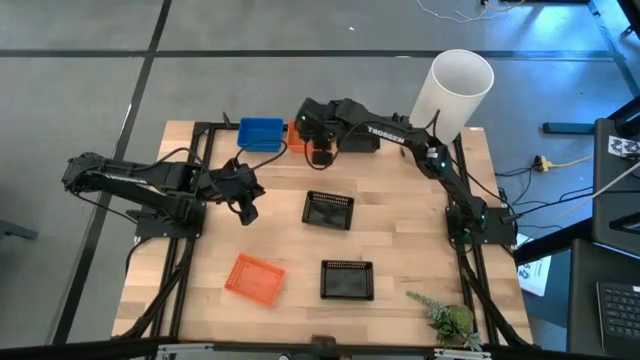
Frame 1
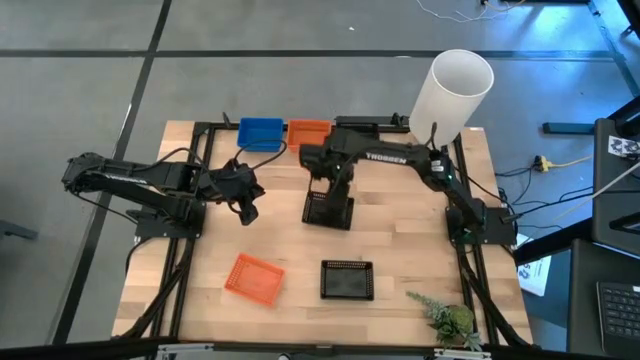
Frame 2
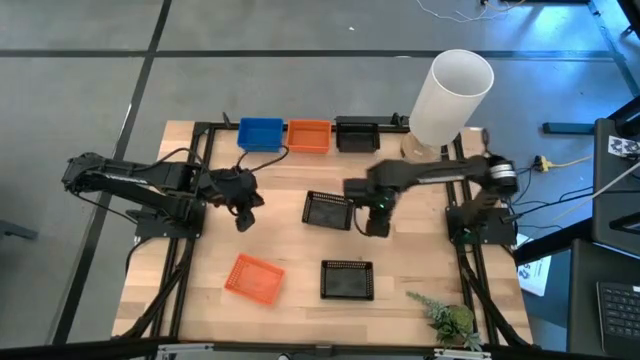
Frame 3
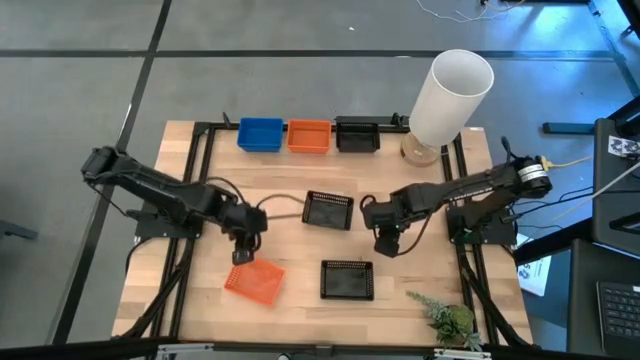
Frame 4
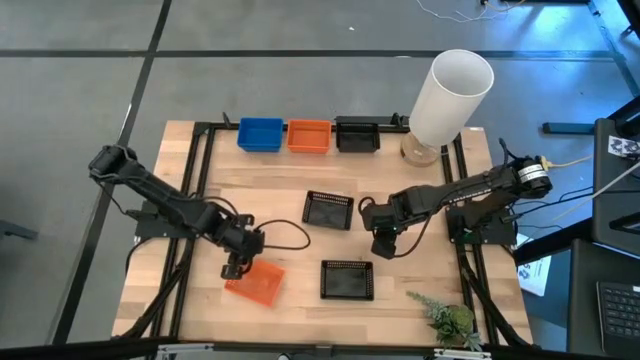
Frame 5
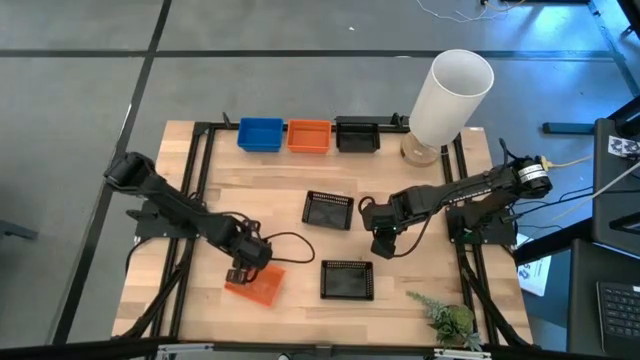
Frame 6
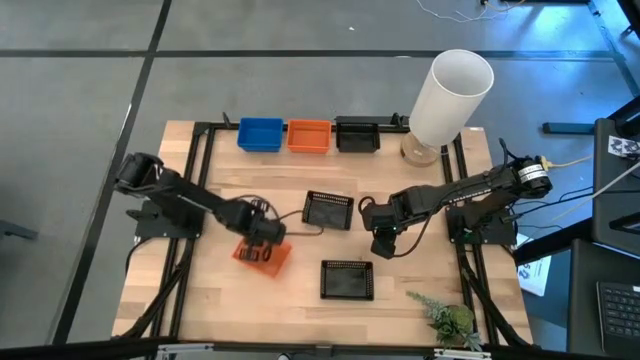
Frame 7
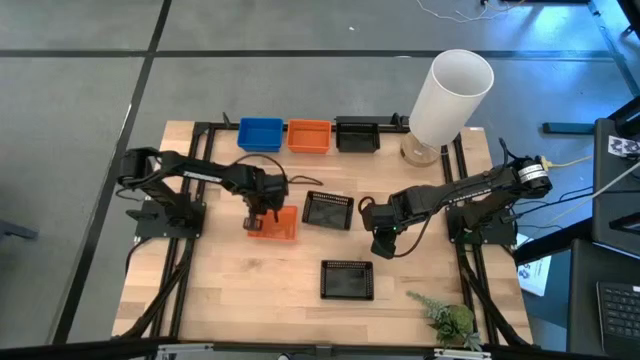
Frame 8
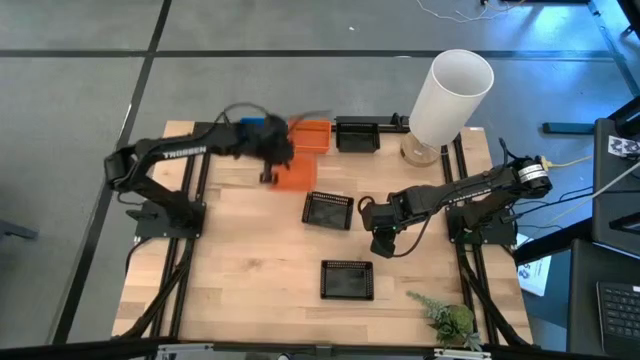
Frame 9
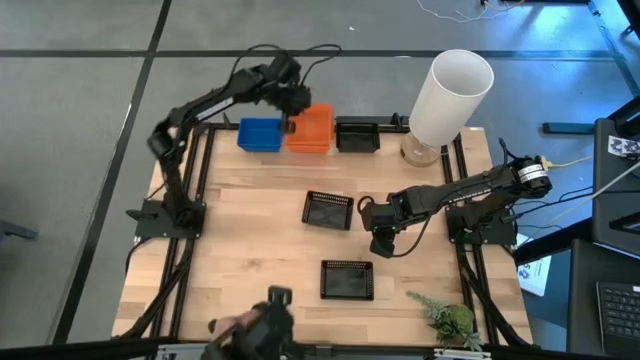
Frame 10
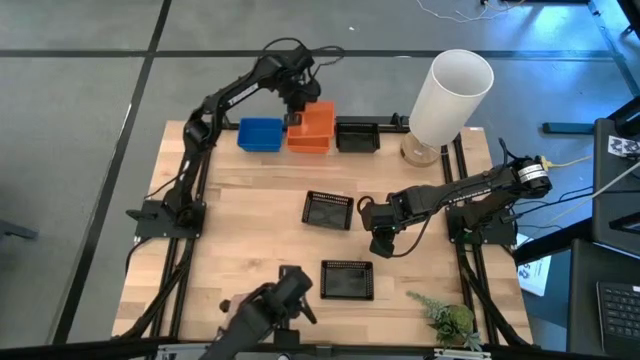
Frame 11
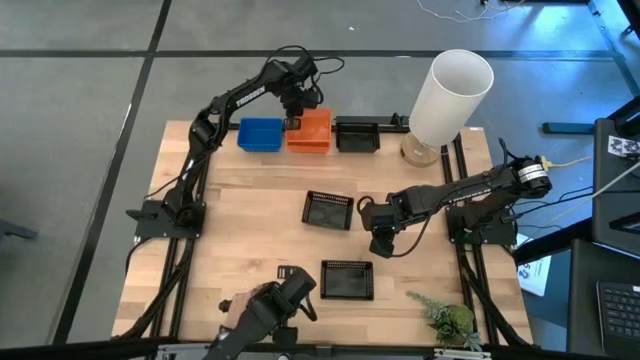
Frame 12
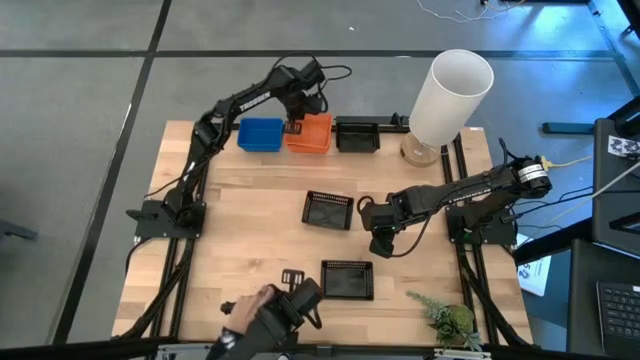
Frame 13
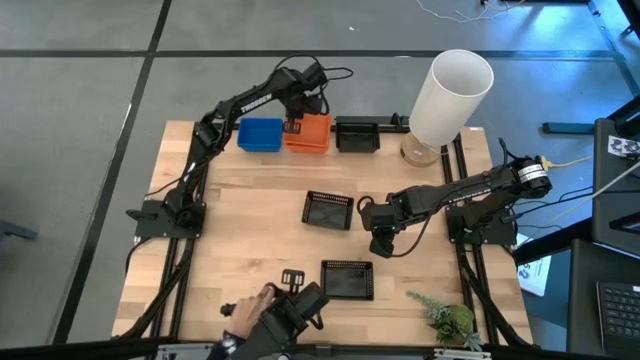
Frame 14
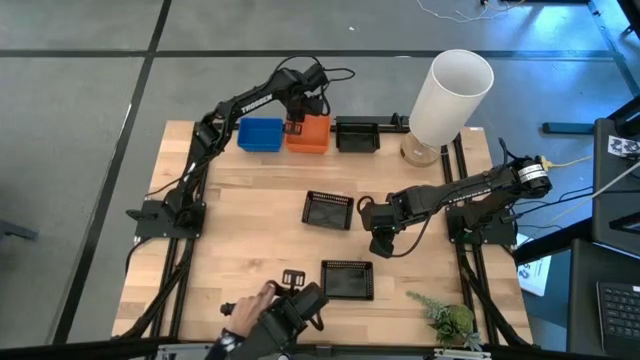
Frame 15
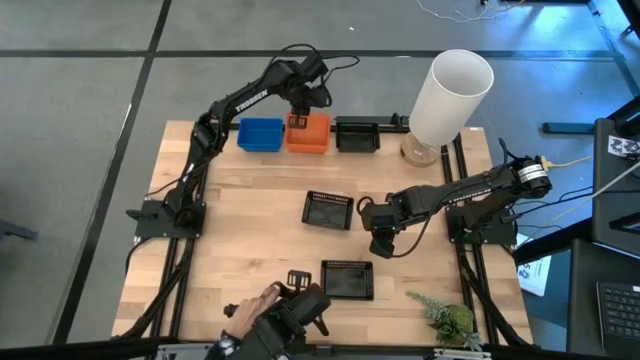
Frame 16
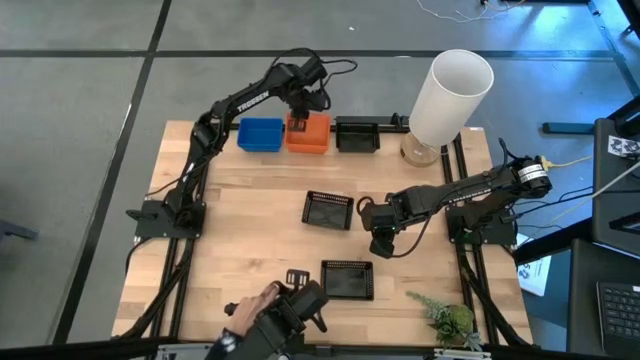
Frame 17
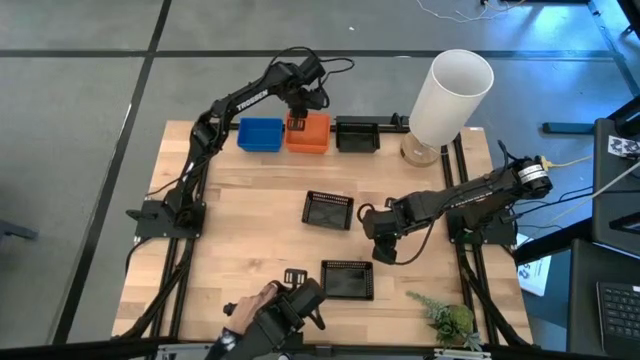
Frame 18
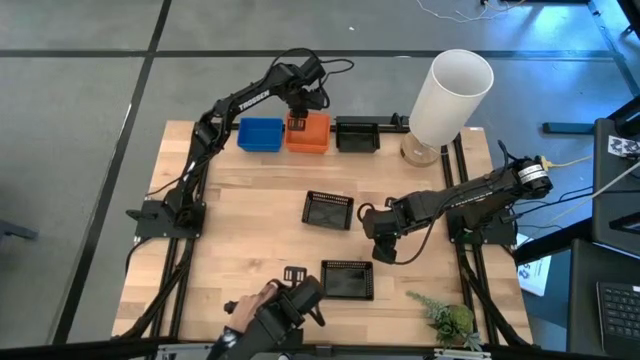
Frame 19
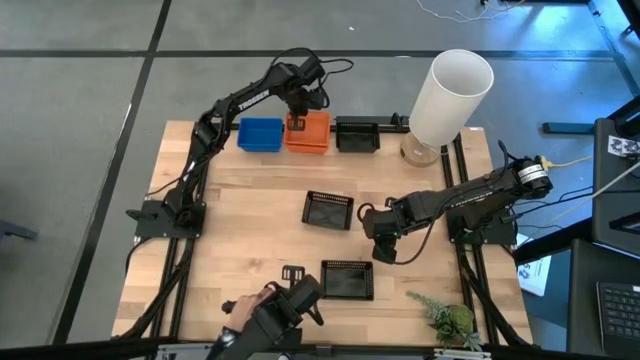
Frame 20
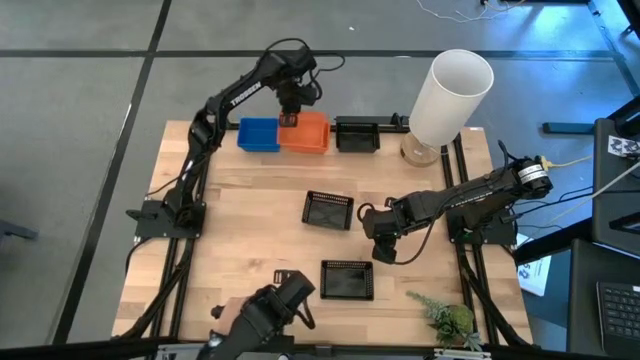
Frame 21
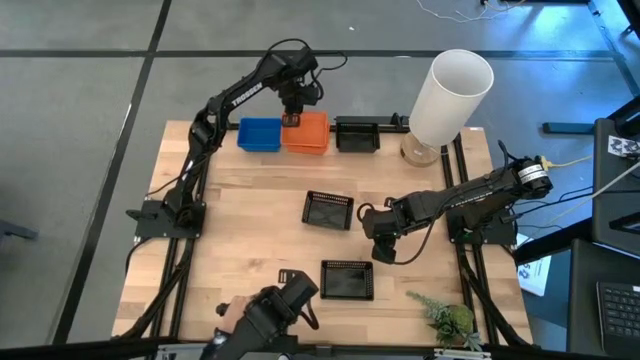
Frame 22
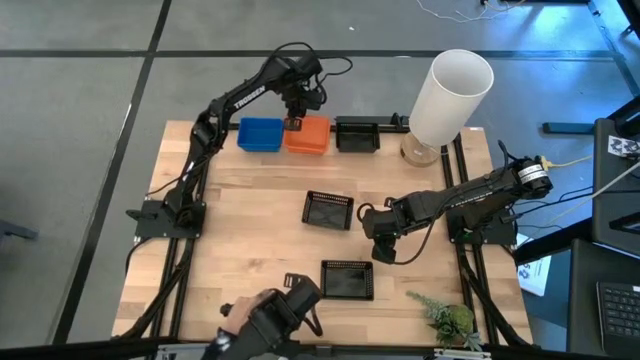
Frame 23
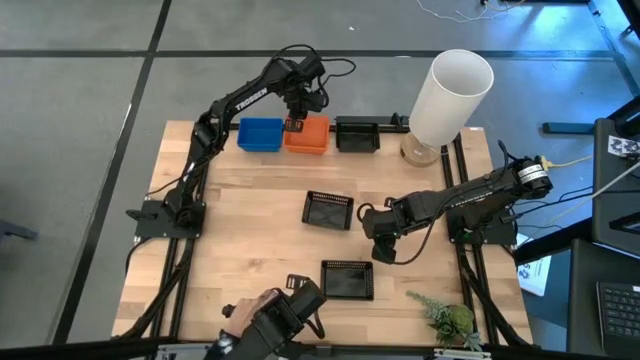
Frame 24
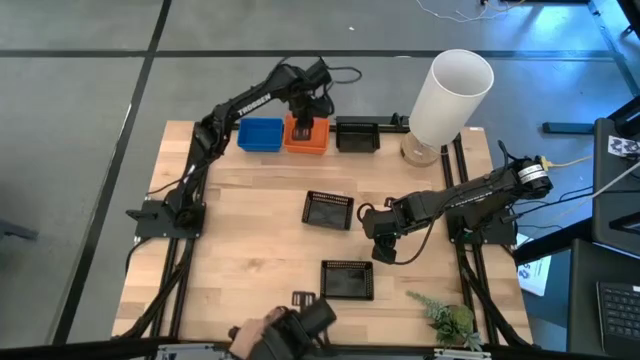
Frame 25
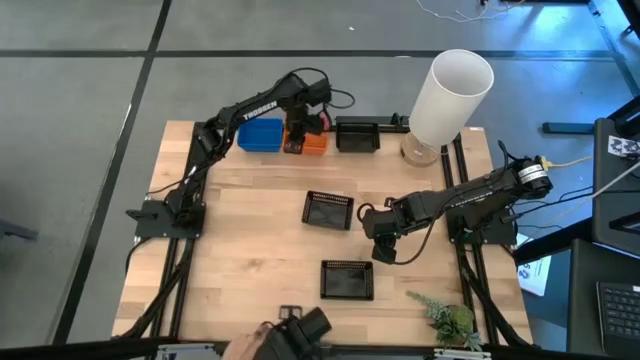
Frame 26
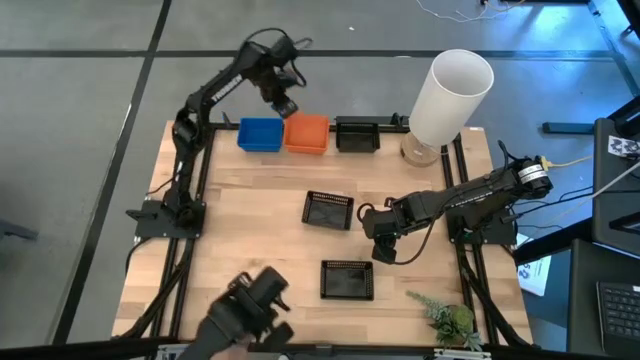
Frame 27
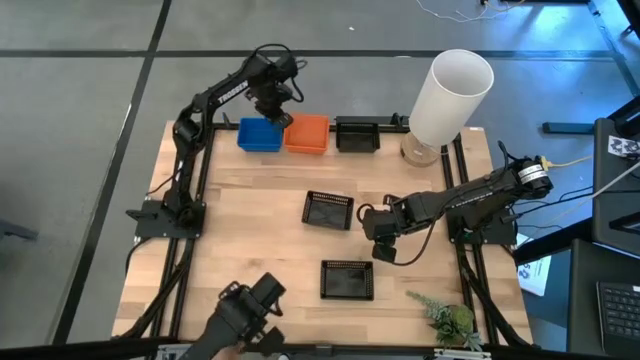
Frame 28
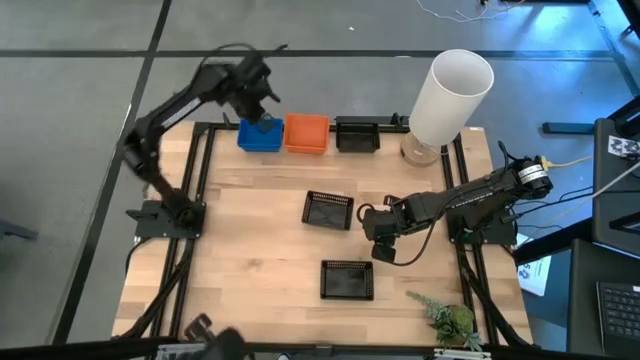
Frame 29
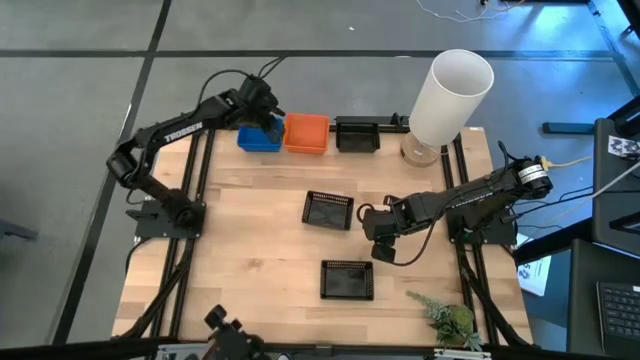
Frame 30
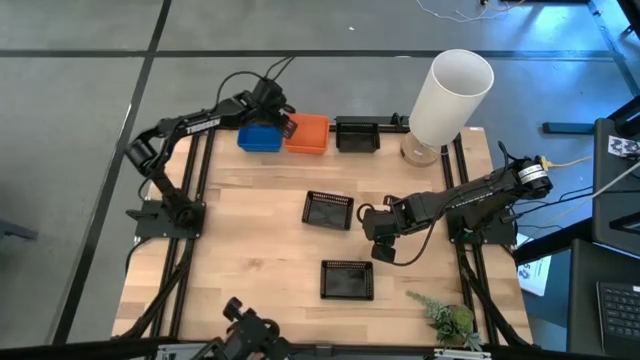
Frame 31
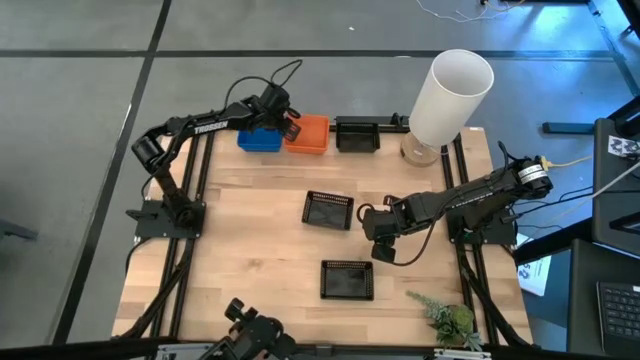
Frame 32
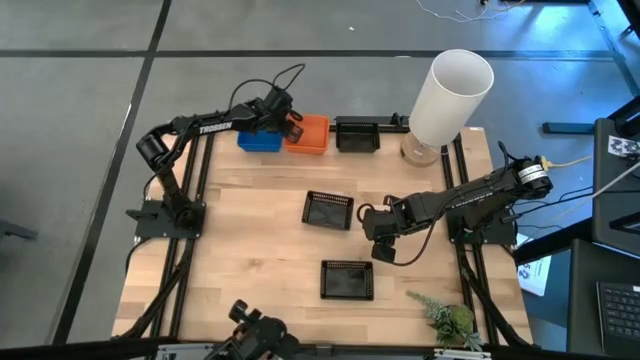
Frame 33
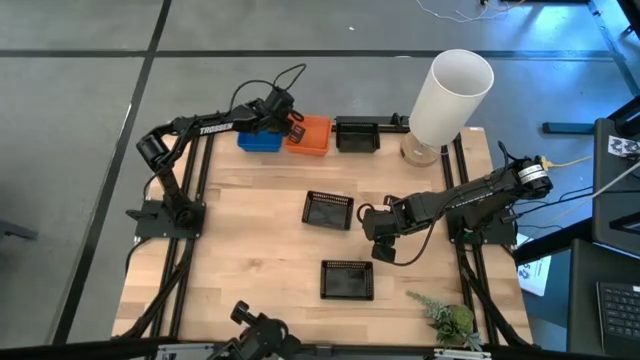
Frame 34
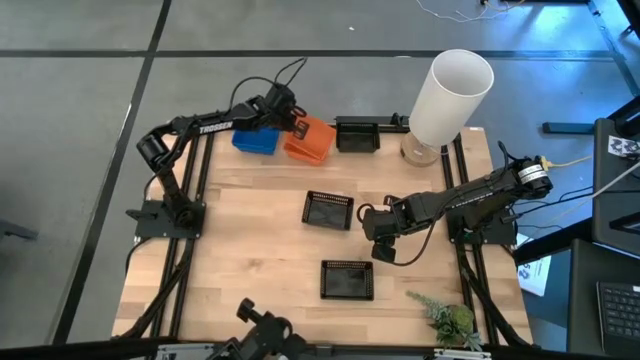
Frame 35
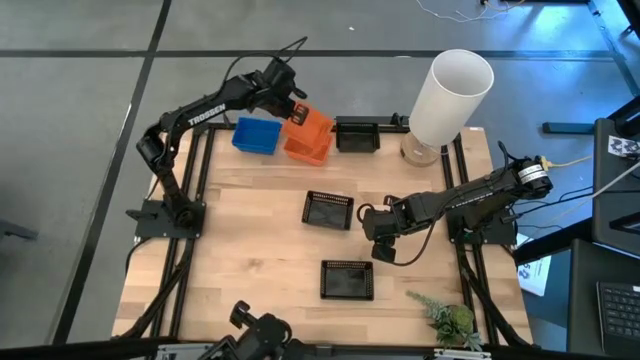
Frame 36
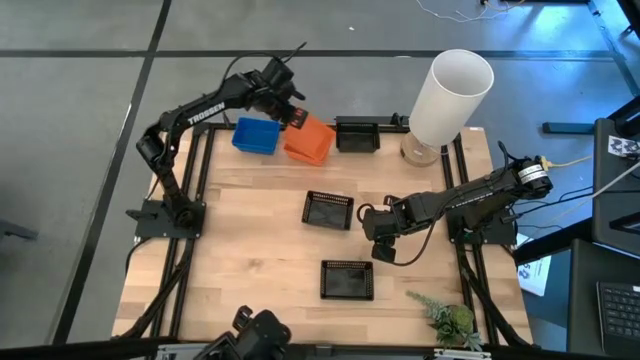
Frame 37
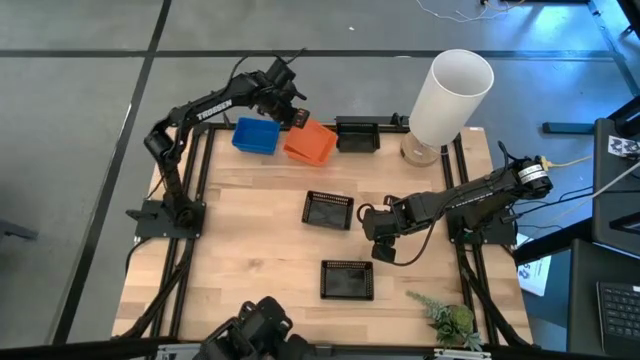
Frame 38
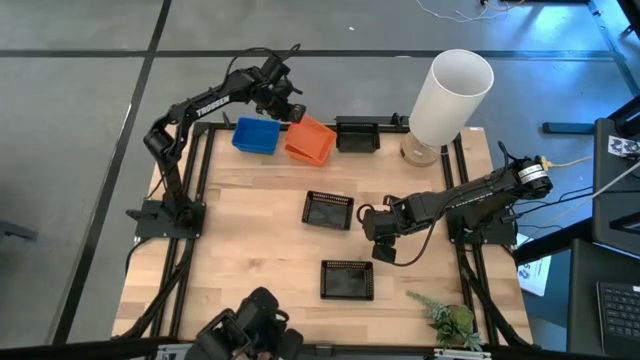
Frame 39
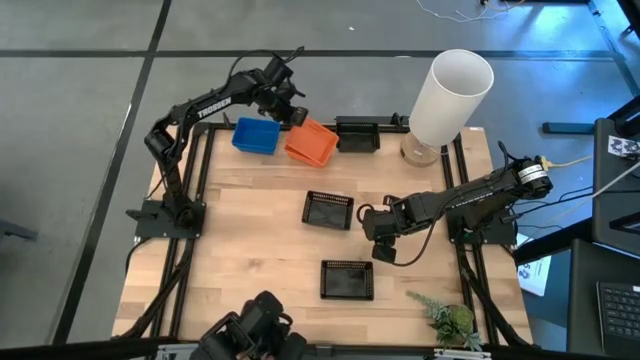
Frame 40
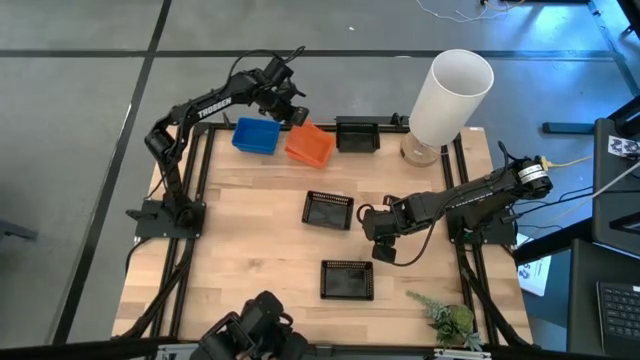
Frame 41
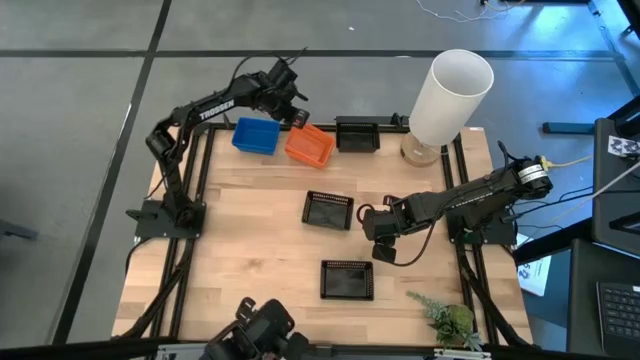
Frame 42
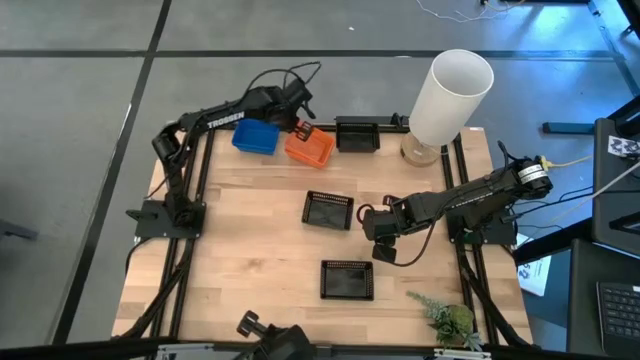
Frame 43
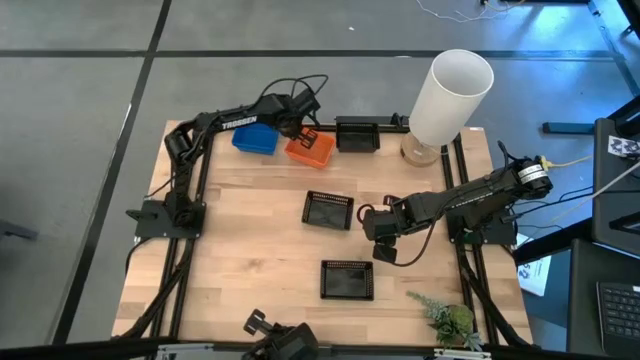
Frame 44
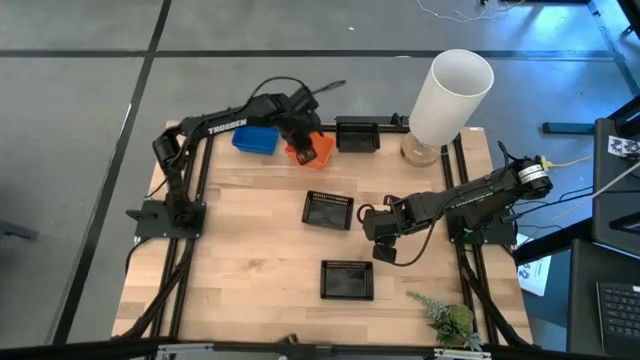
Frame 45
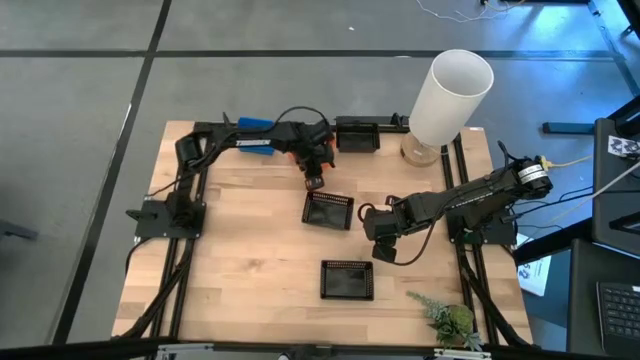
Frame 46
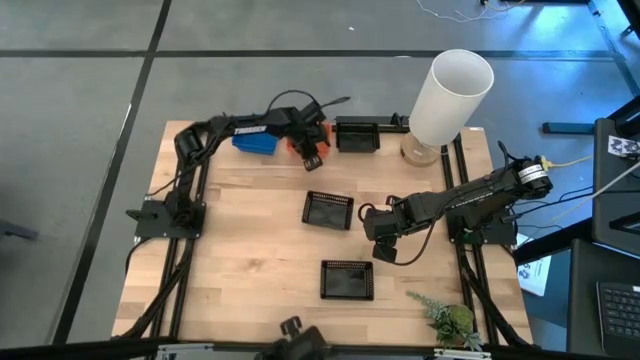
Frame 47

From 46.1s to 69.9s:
Stack the bottom orange bin on the stacked orange bins
